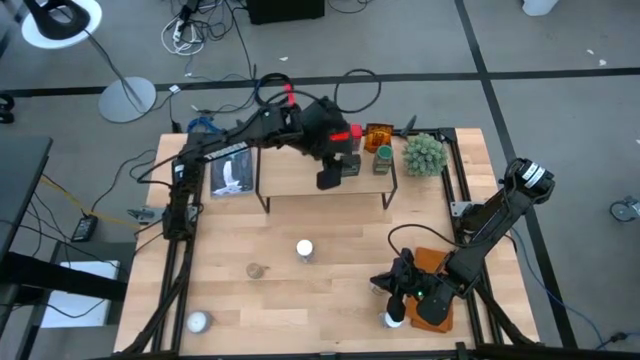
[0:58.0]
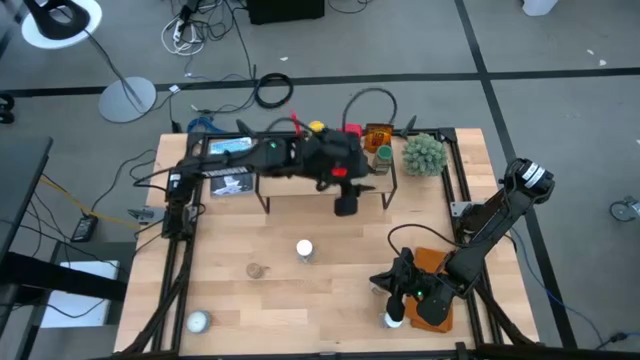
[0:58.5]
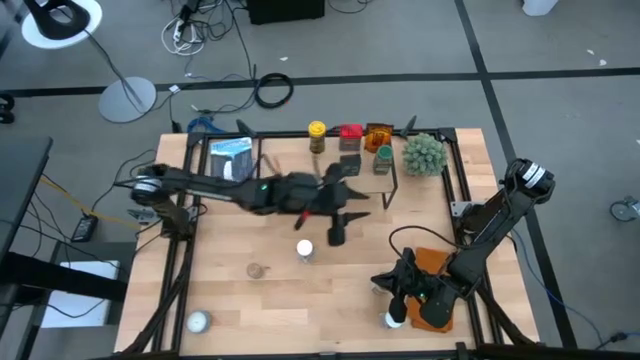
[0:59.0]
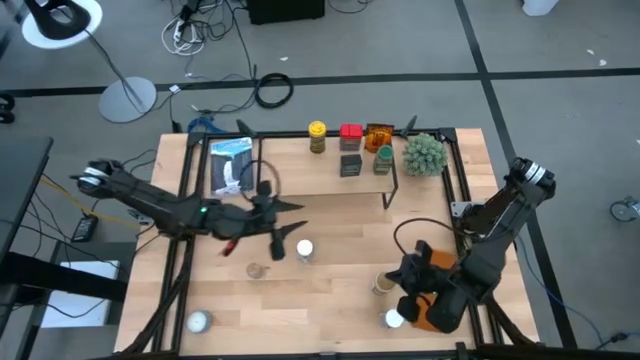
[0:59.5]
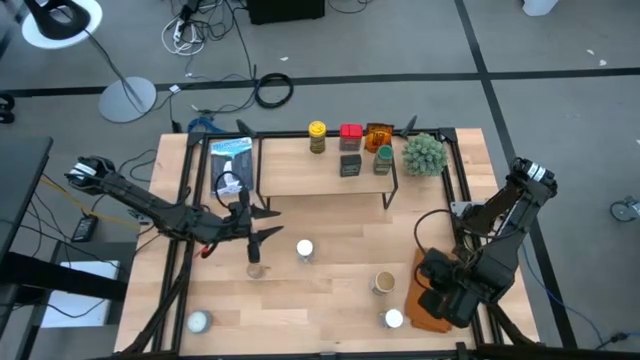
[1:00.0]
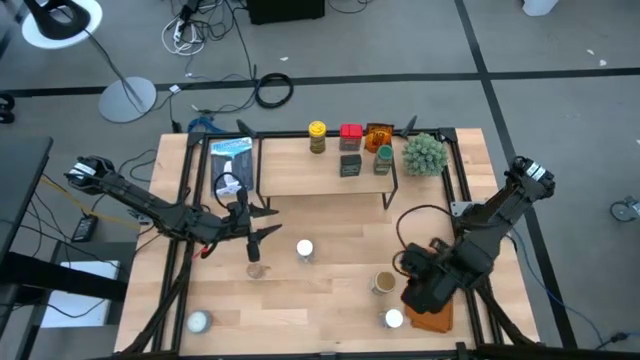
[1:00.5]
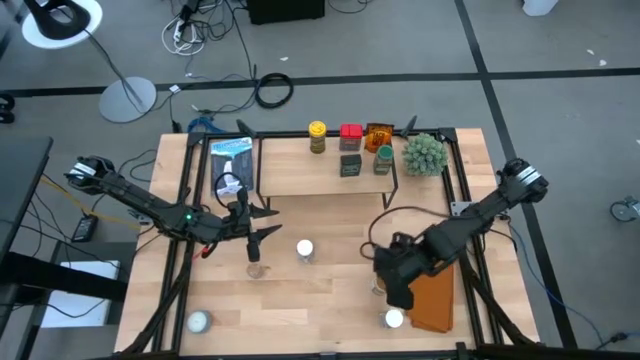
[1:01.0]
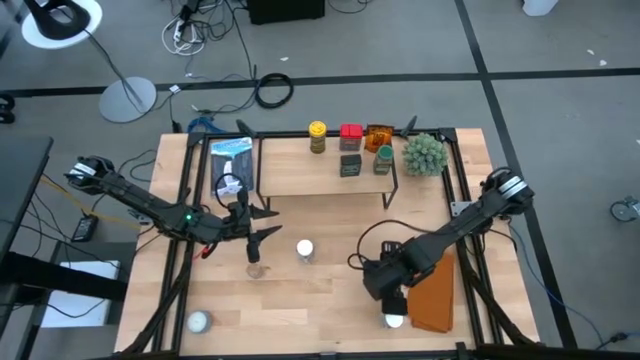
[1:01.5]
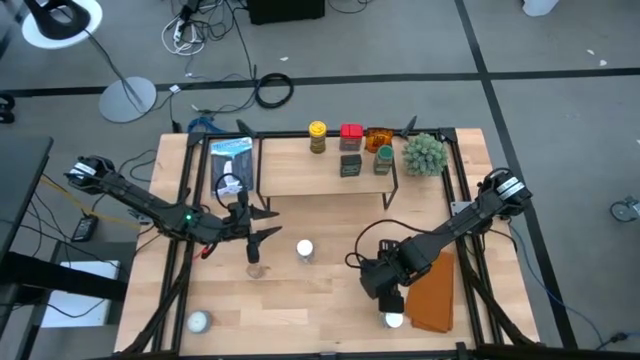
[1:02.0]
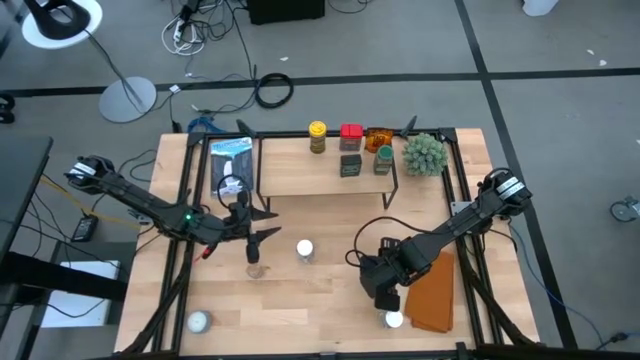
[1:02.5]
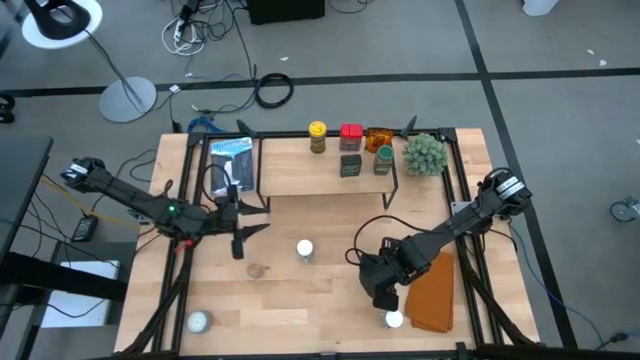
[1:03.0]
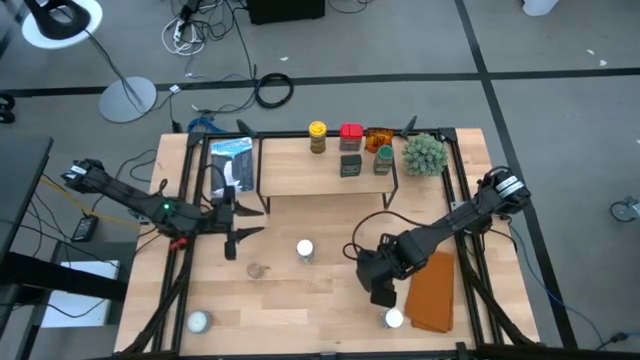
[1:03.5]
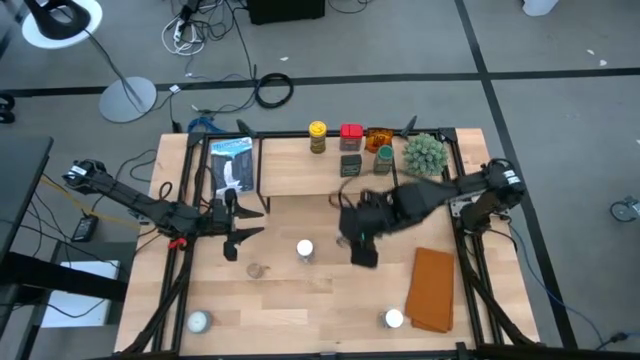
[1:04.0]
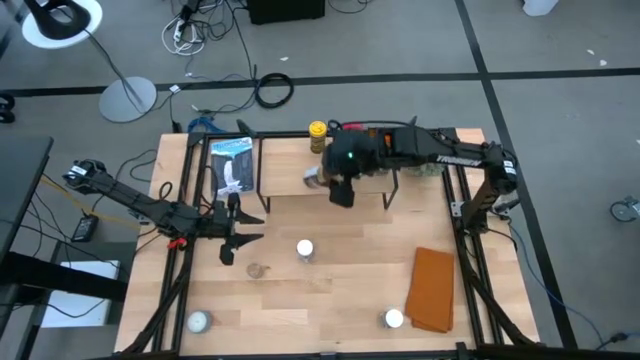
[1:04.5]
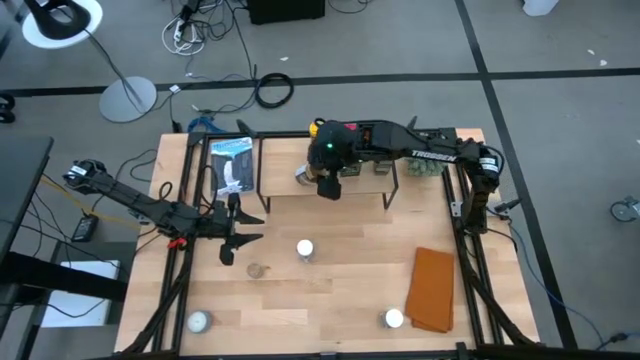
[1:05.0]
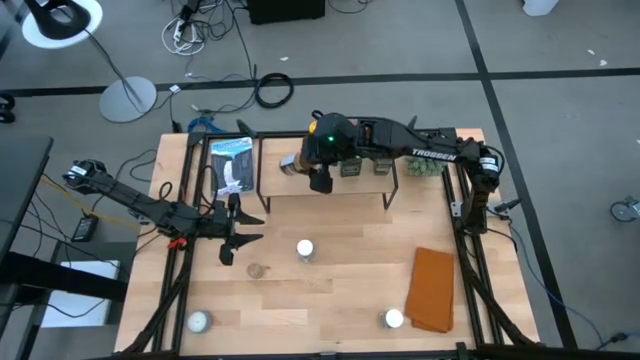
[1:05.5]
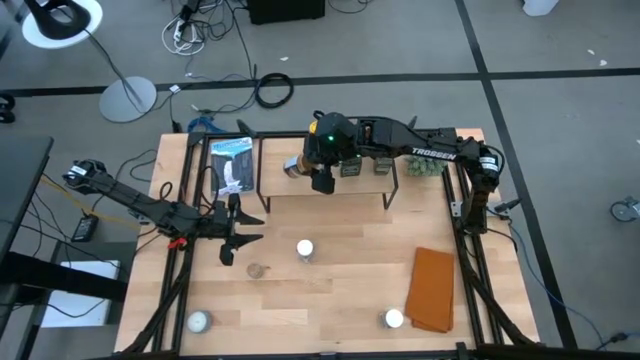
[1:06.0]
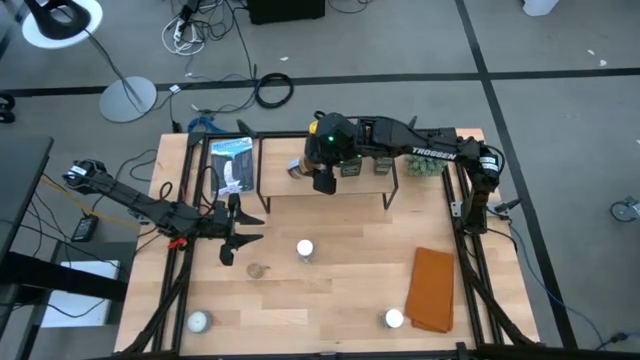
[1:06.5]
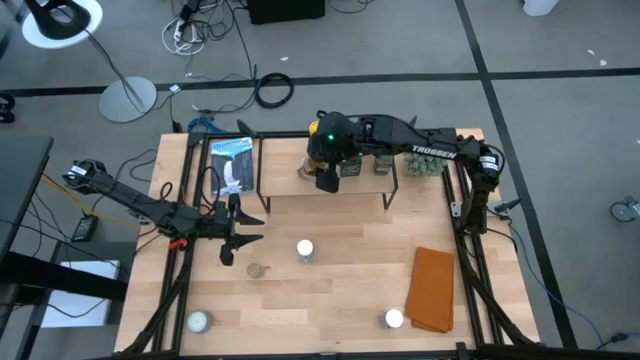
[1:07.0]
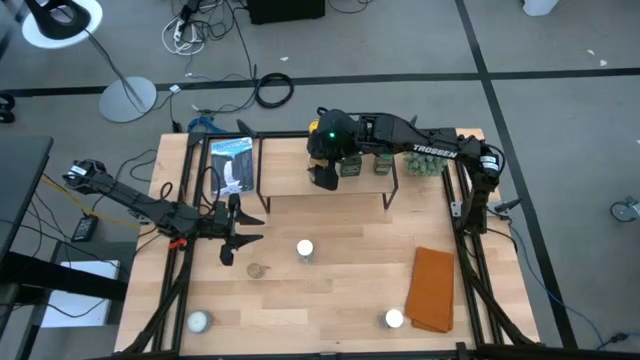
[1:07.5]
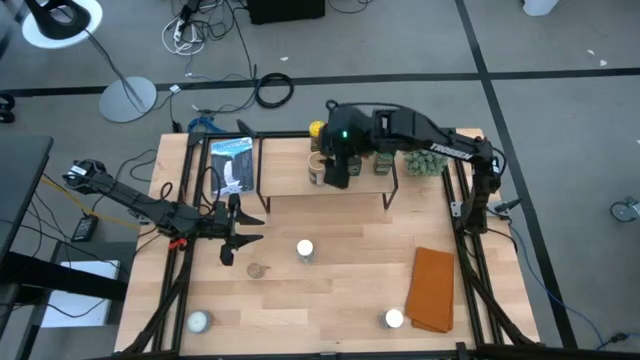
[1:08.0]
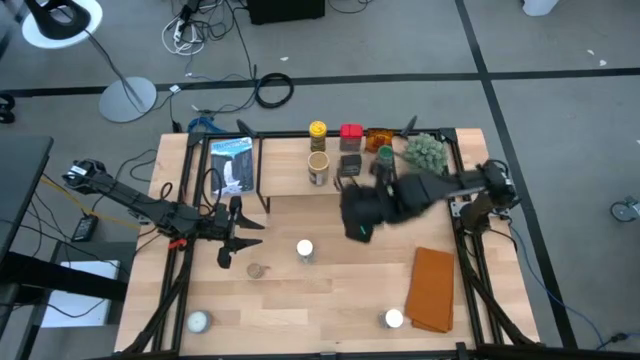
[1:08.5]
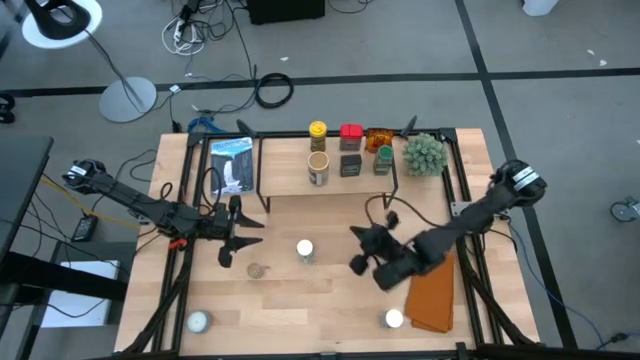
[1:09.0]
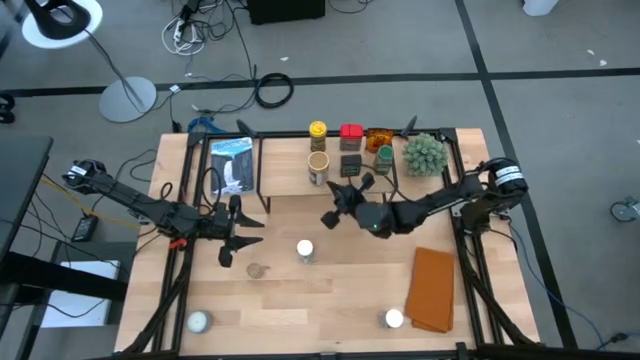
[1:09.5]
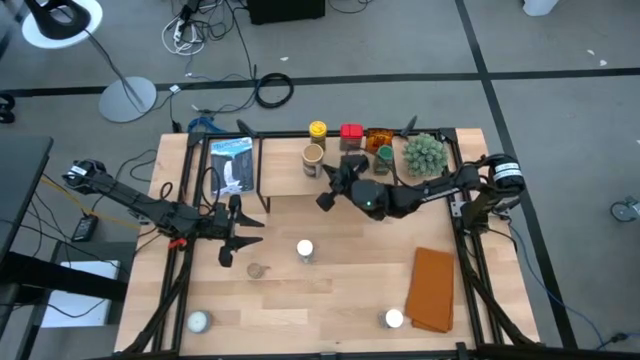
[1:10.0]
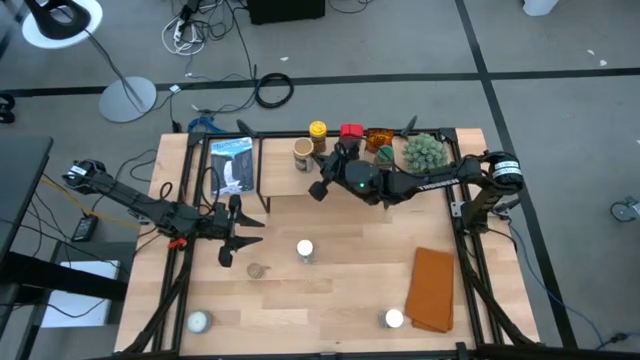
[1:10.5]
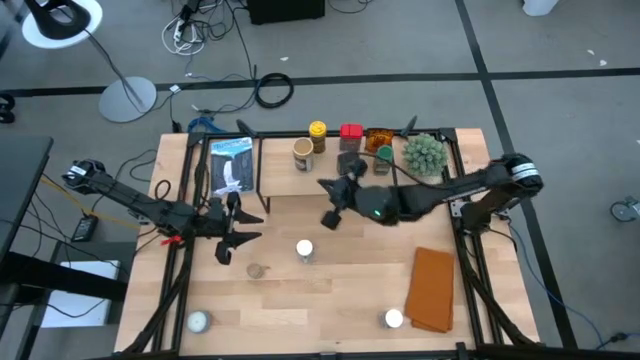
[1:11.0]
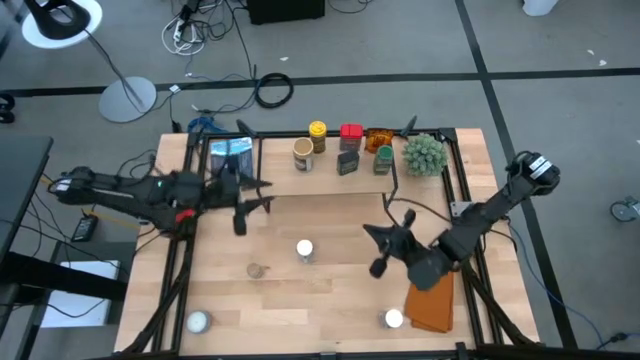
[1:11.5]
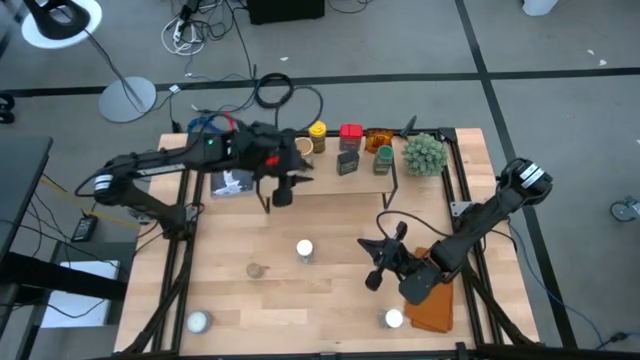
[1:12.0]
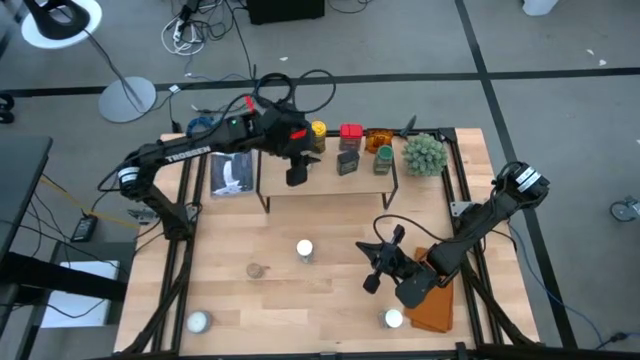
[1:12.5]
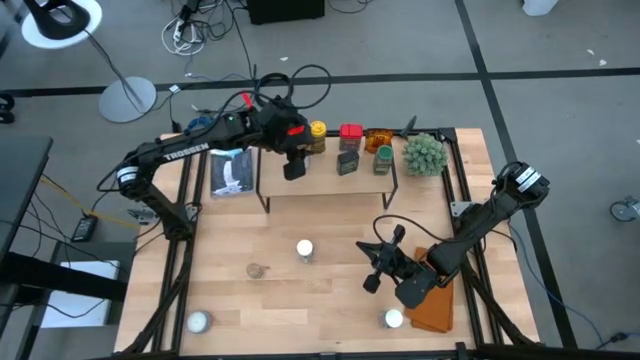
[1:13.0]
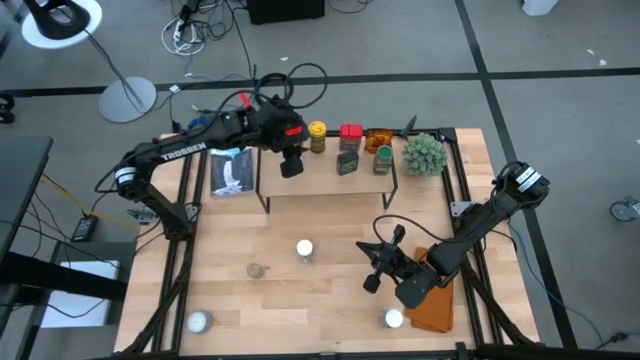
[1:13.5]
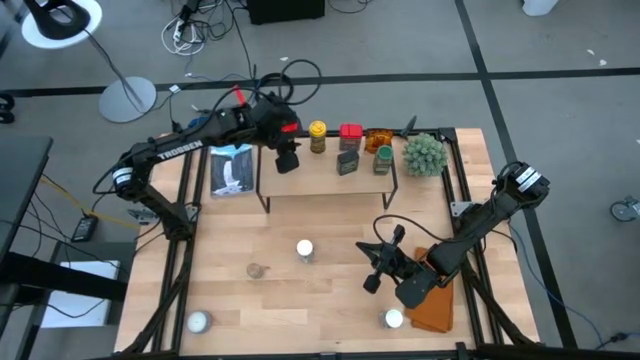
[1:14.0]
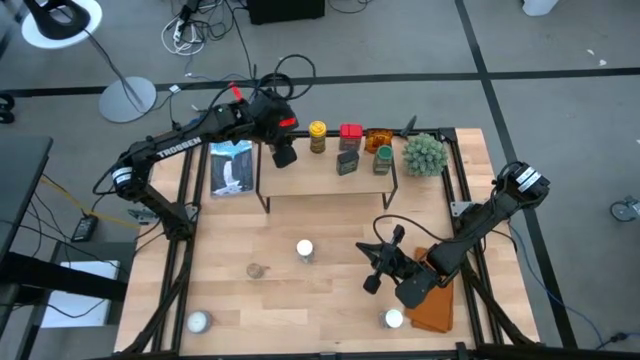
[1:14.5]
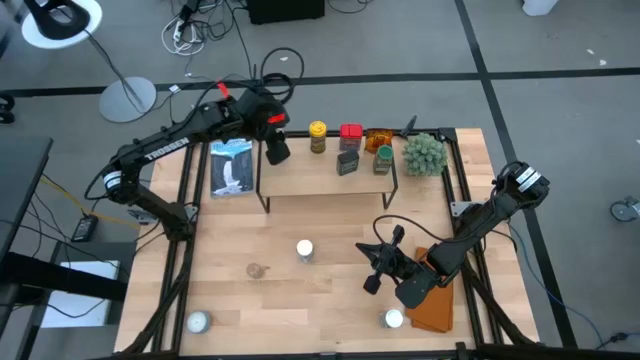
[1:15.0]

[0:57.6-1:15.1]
Task: Shelf spices
Put the gold seasoning bottle on the shelf

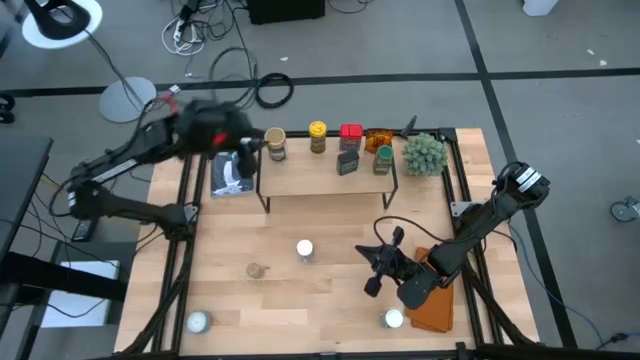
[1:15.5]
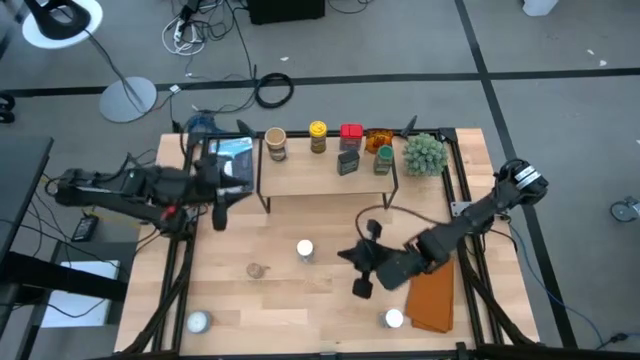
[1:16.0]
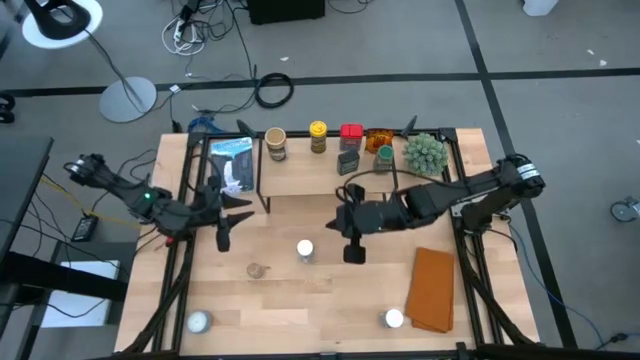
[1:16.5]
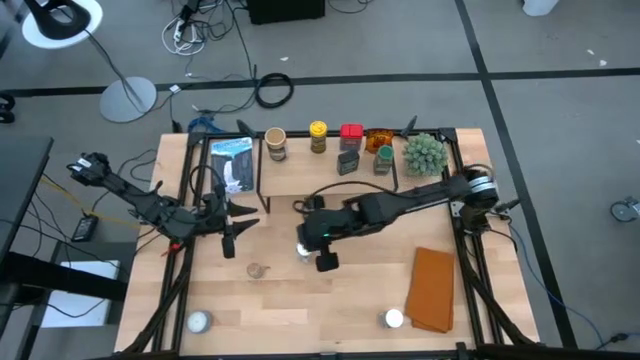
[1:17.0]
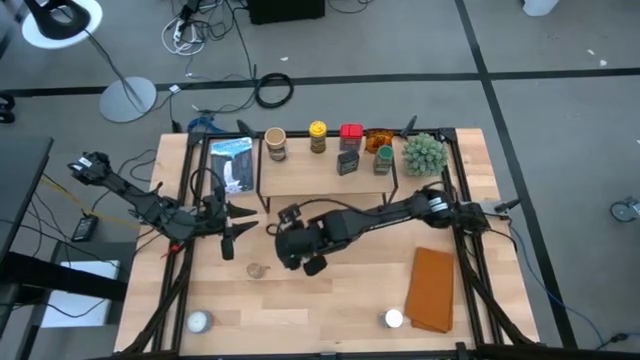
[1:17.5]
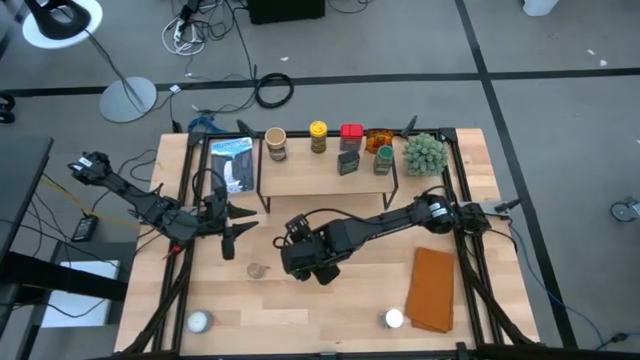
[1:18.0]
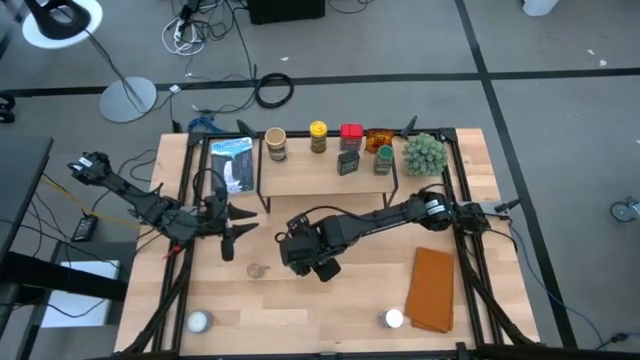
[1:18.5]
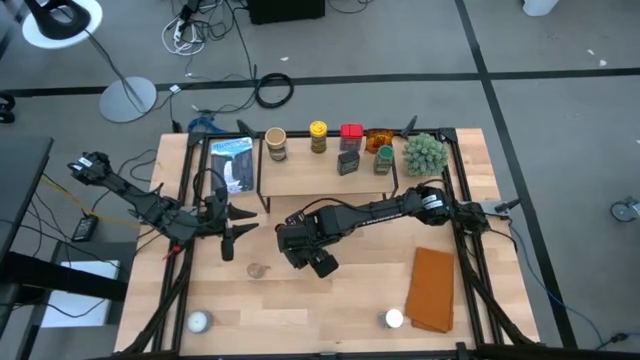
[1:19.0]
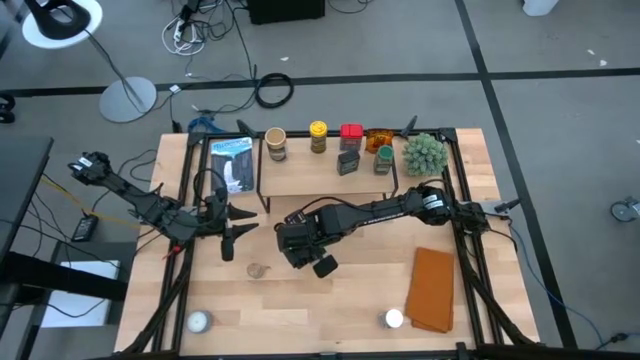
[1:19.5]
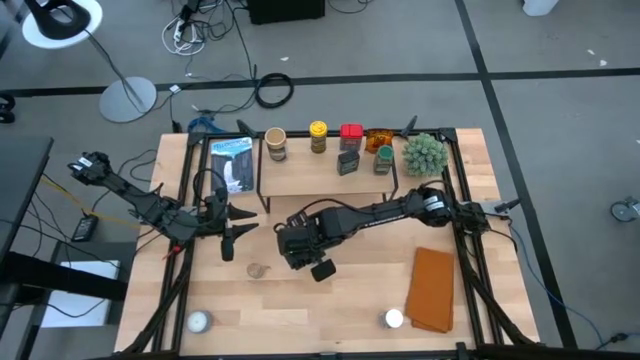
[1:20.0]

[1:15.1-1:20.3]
Put the top white seasoning bottle on the shelf
